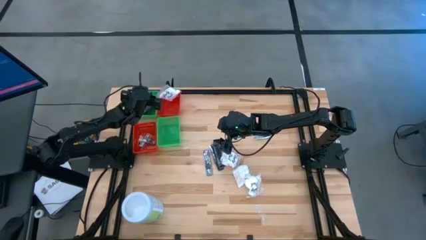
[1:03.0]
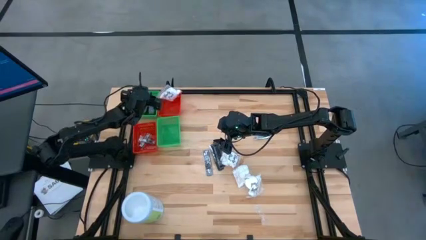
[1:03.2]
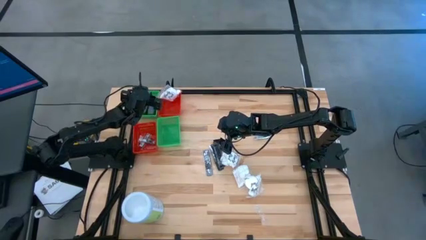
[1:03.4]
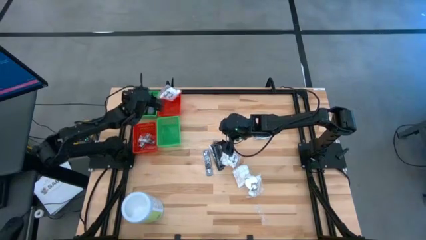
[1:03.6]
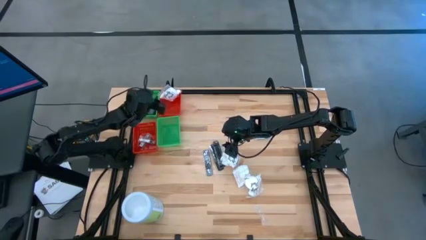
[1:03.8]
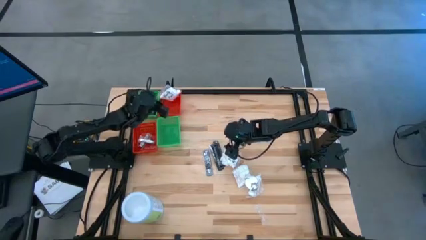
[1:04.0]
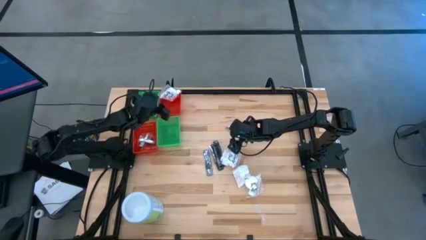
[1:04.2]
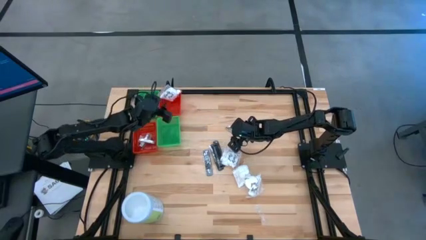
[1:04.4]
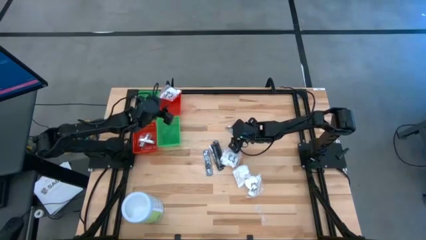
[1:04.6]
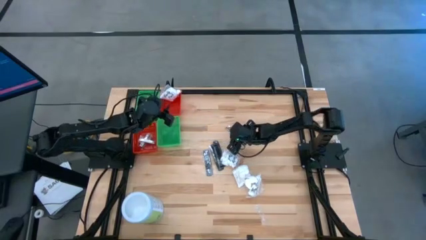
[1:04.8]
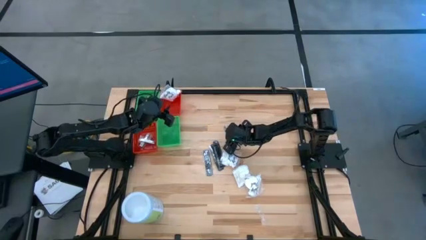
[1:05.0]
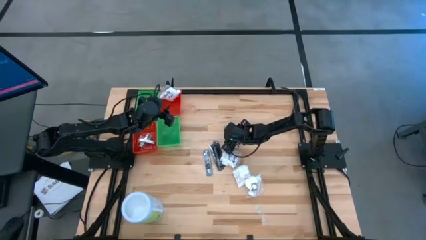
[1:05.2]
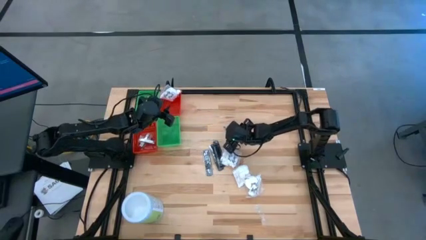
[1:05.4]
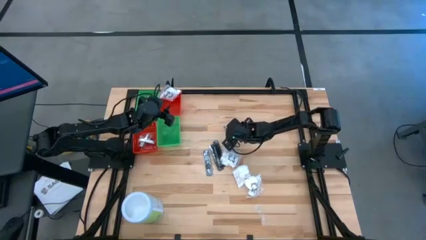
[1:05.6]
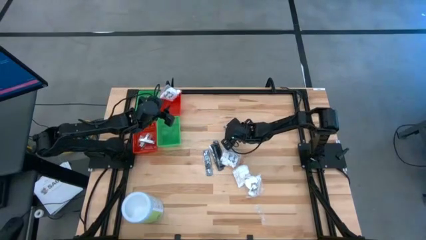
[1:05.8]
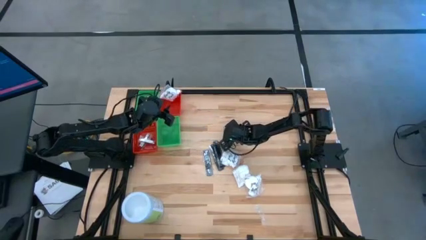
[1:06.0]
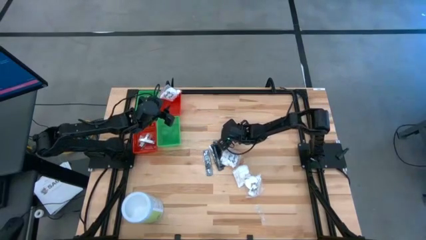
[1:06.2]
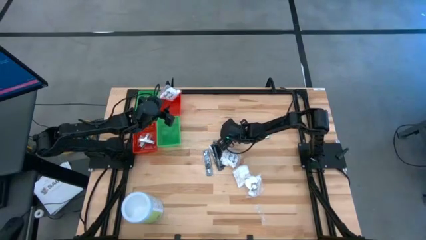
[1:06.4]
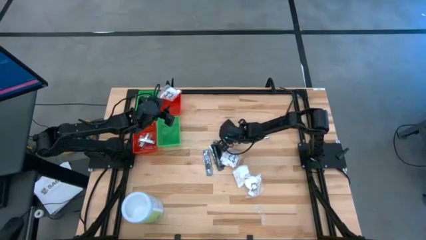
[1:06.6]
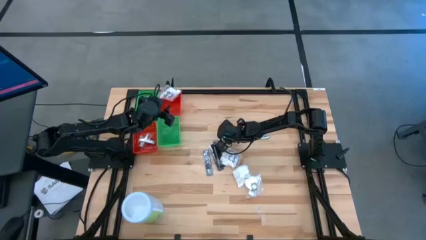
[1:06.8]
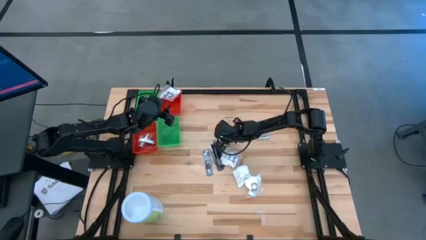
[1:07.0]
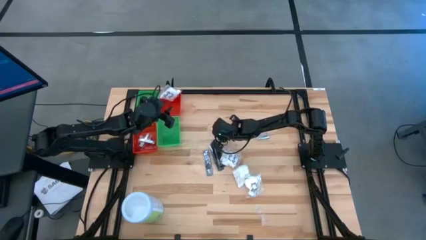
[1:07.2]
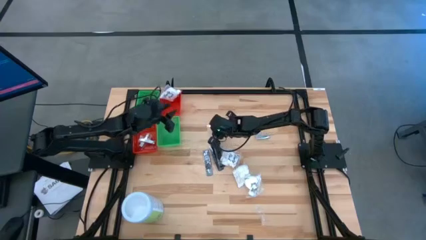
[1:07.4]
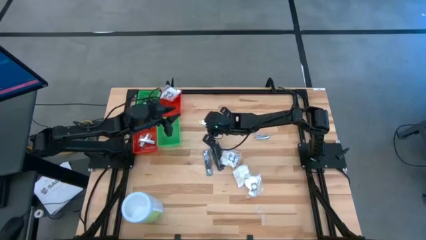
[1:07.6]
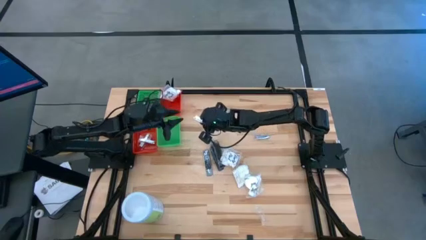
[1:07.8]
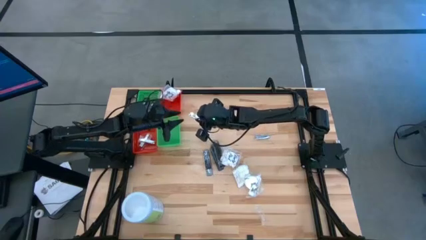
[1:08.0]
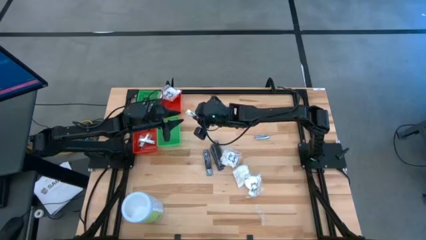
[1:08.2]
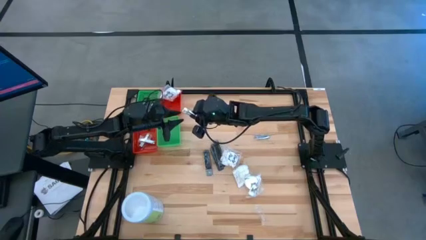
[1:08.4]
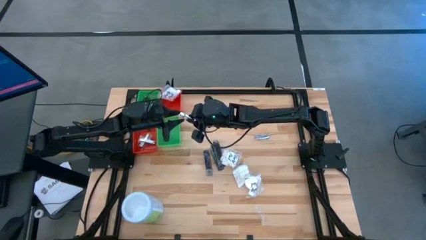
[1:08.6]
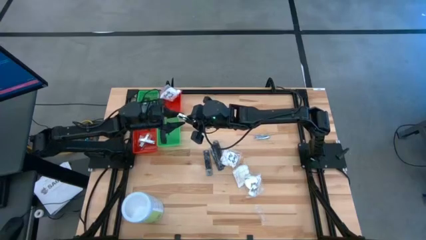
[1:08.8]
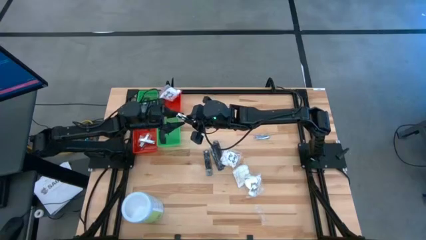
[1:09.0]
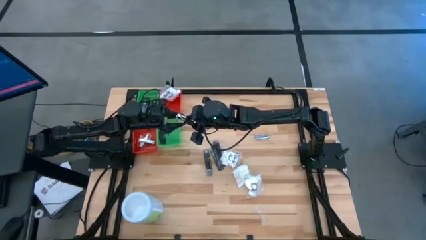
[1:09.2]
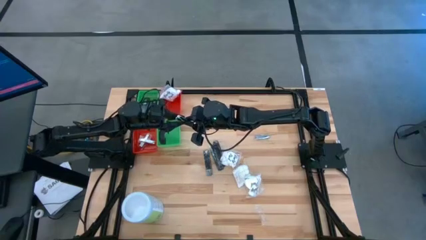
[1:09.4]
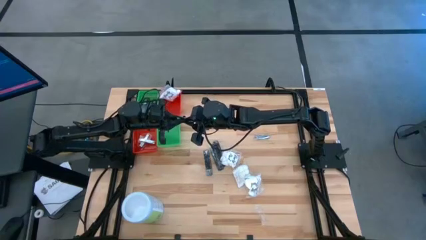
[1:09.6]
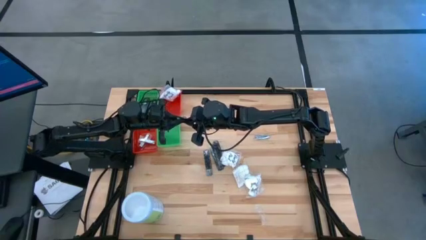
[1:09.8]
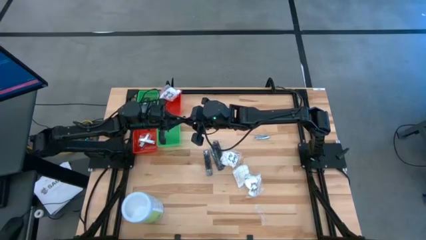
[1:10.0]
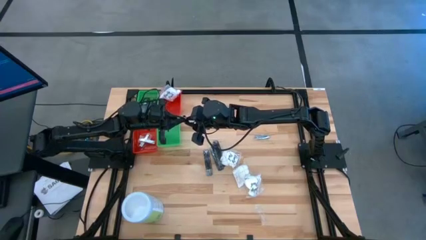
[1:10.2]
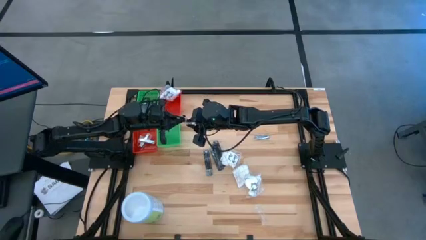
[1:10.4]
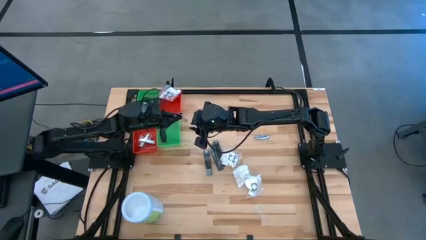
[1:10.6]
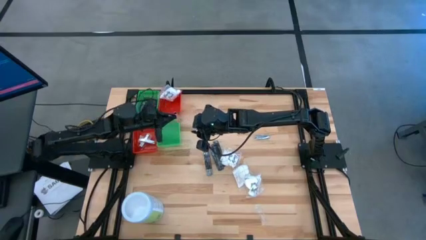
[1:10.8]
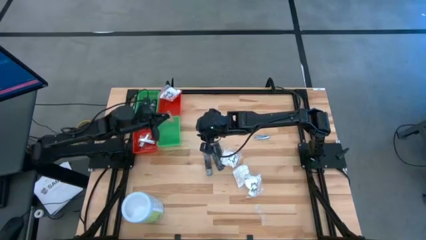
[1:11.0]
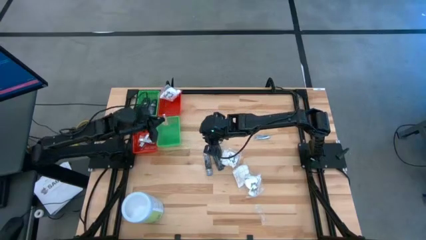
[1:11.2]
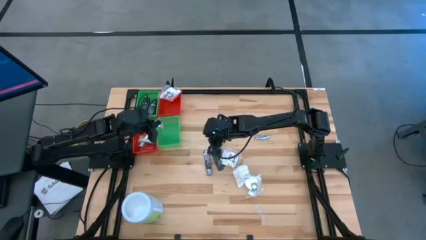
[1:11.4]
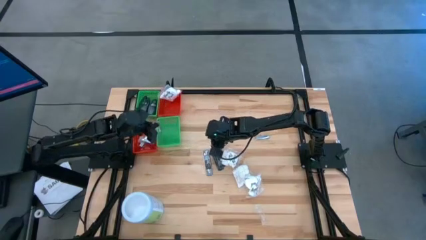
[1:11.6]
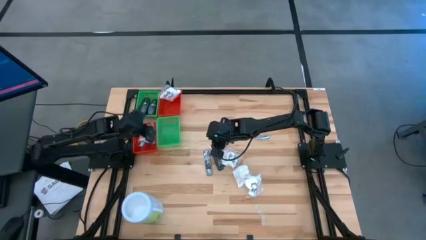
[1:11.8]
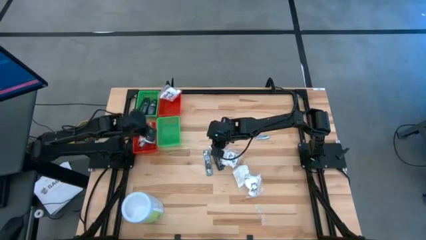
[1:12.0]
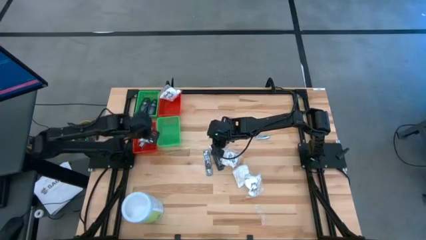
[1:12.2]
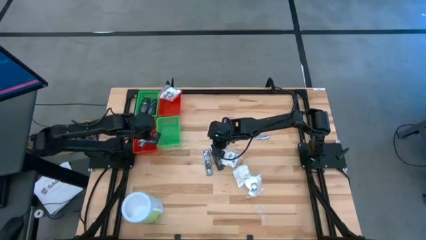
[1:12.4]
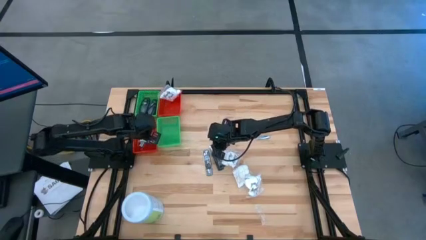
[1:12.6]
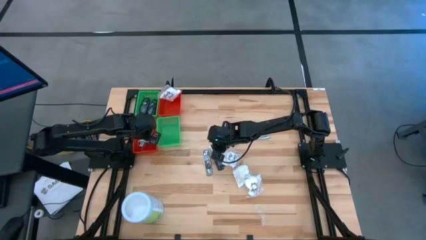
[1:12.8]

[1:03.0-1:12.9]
Task: Pick & Place Travel size toiletries
Put the silver nail cutter into the bottom red bin

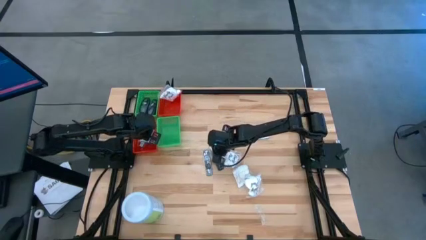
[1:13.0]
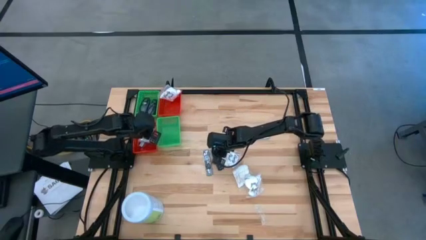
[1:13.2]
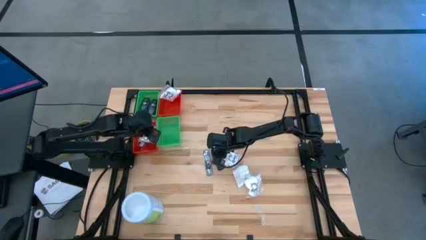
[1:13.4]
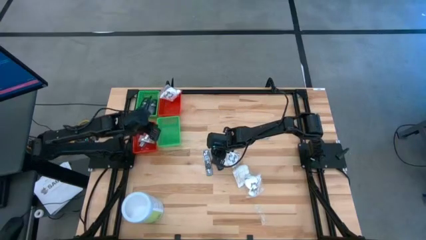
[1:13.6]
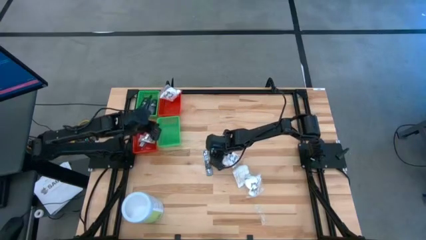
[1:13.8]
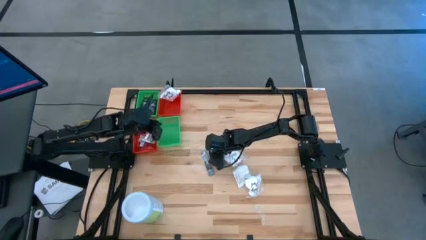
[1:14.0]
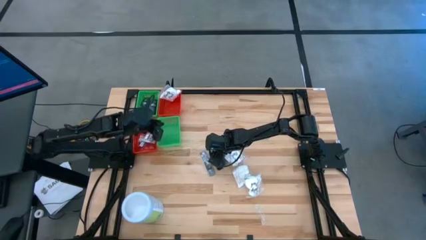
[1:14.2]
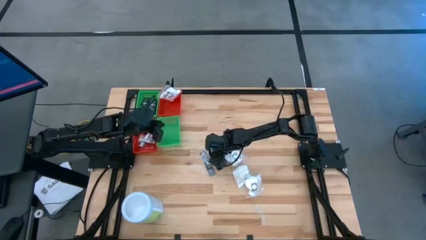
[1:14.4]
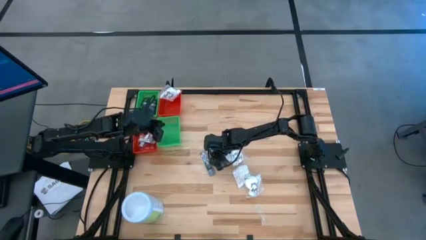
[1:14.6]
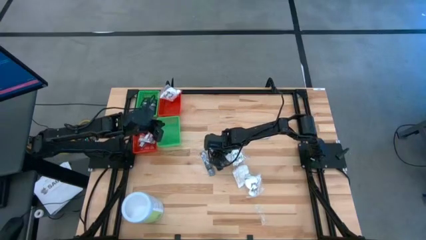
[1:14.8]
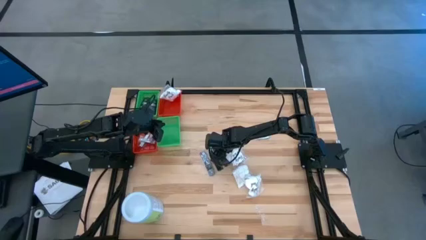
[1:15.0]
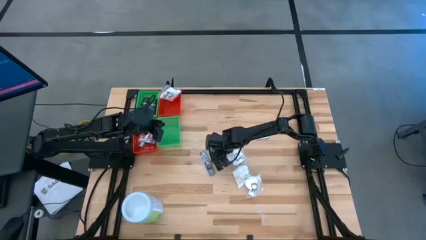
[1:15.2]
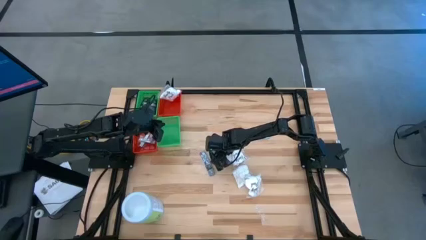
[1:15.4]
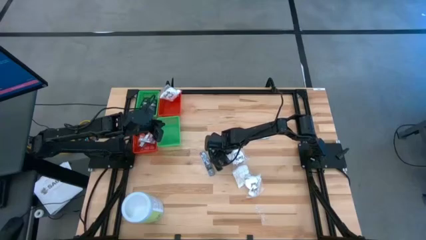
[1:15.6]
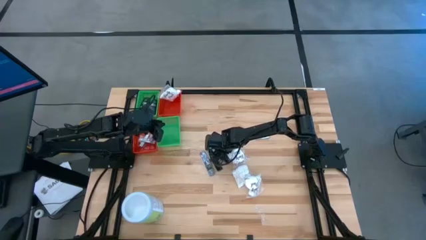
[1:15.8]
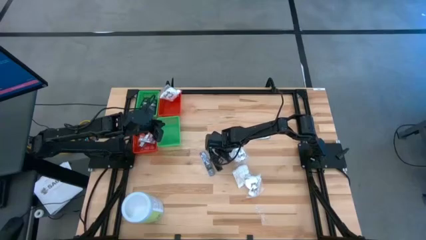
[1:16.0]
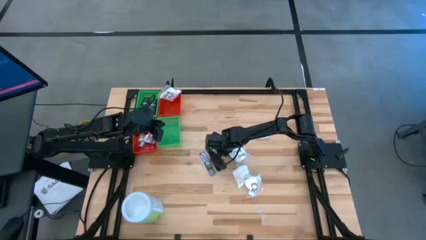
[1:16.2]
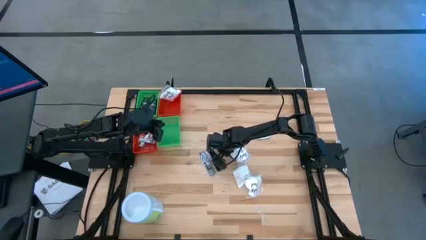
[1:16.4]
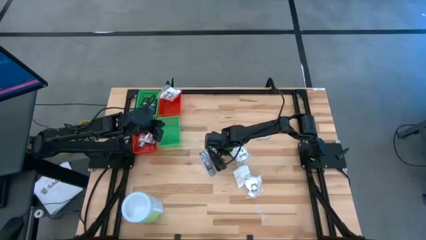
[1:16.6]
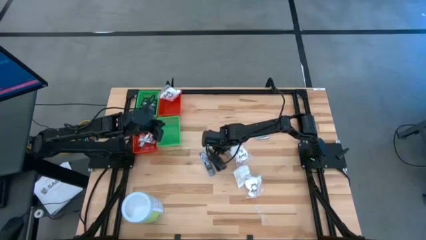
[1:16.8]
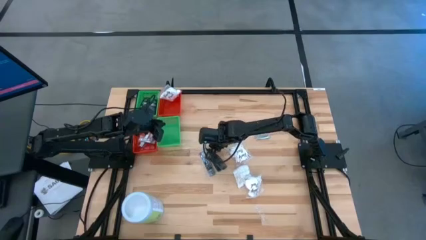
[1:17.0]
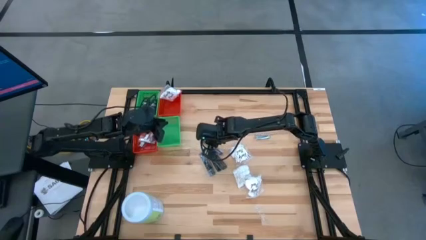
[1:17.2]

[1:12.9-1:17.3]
Put the black comb into the bottom green bin
